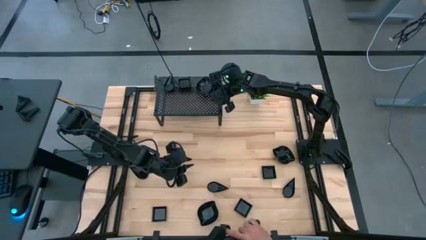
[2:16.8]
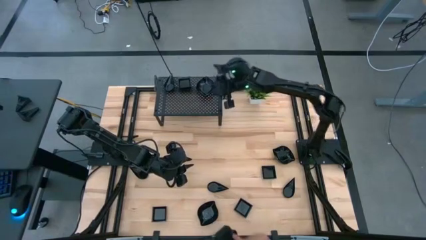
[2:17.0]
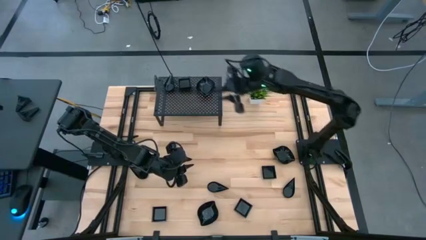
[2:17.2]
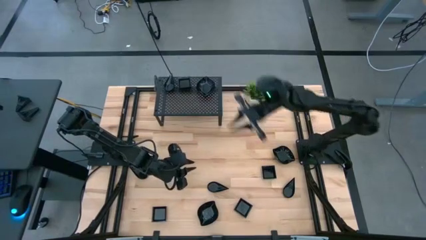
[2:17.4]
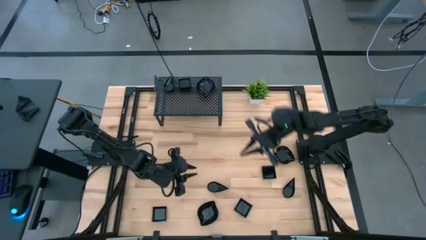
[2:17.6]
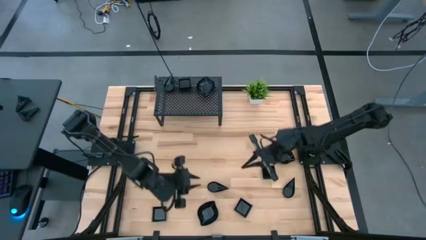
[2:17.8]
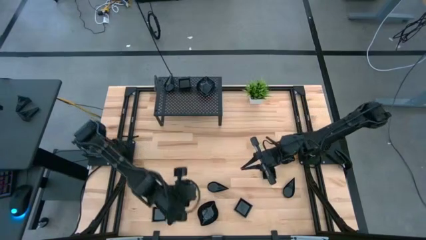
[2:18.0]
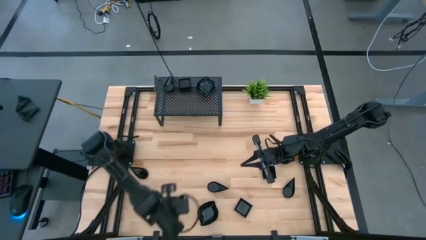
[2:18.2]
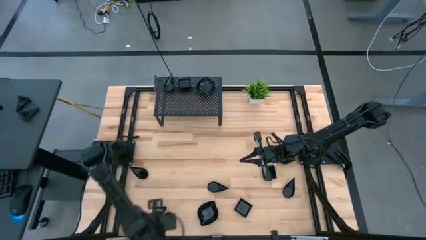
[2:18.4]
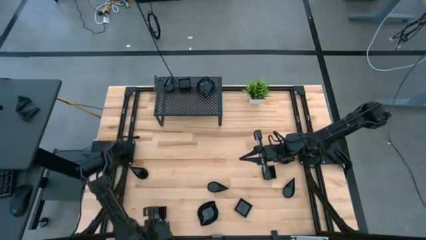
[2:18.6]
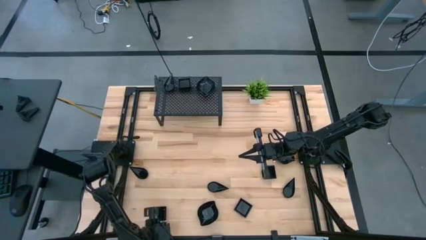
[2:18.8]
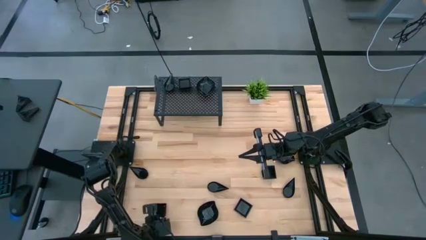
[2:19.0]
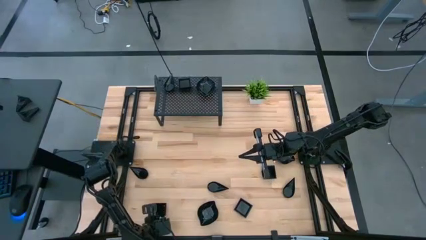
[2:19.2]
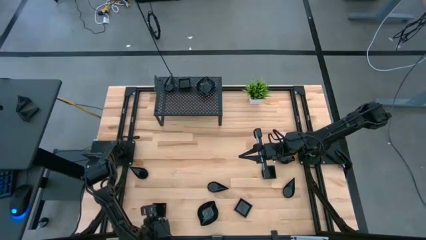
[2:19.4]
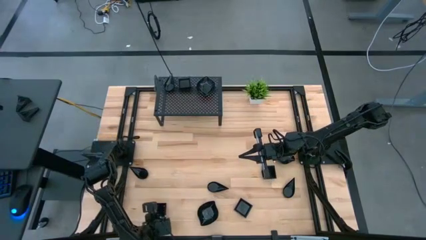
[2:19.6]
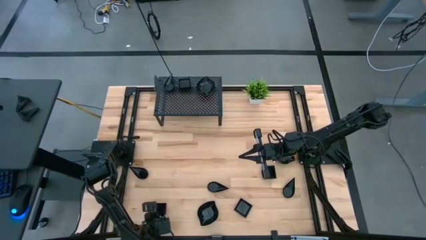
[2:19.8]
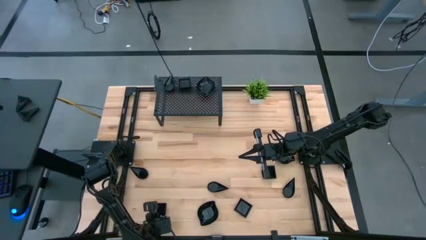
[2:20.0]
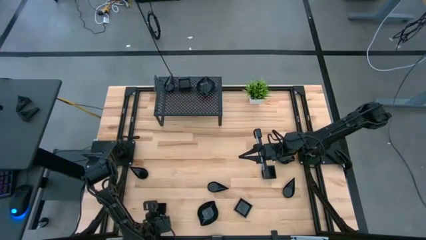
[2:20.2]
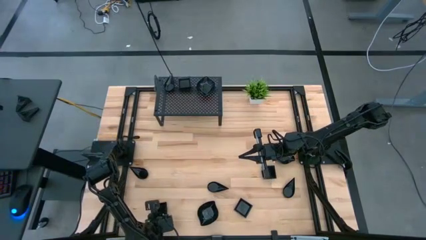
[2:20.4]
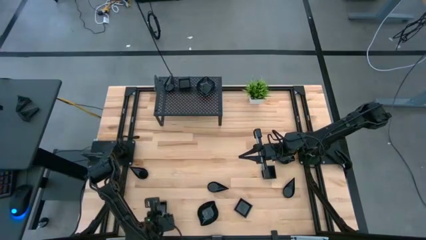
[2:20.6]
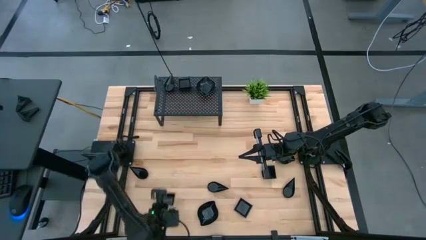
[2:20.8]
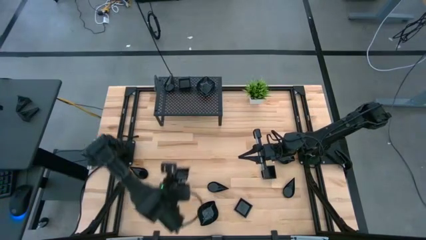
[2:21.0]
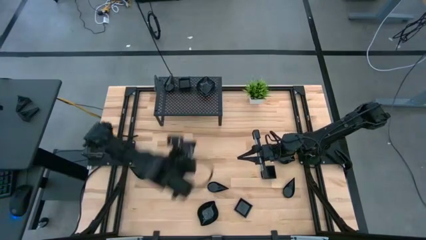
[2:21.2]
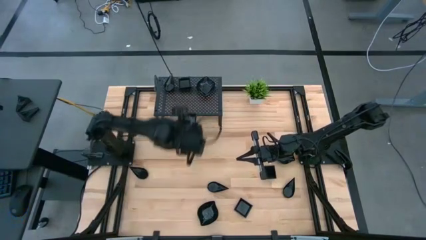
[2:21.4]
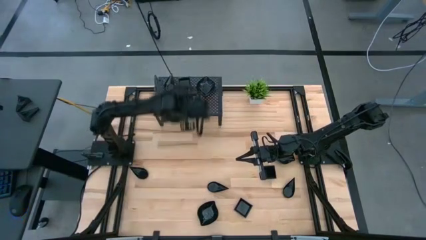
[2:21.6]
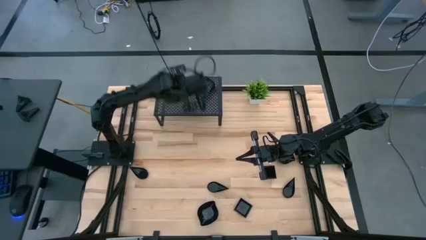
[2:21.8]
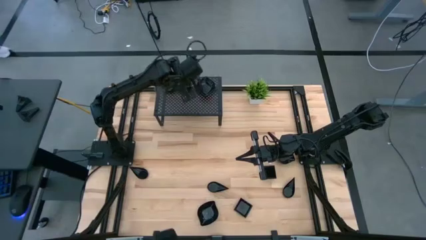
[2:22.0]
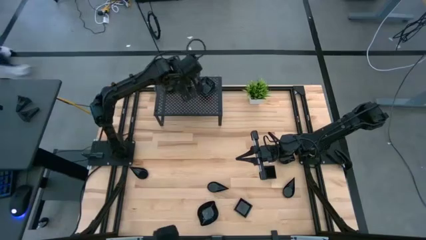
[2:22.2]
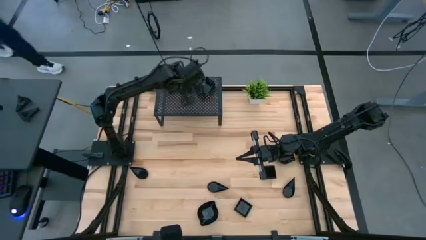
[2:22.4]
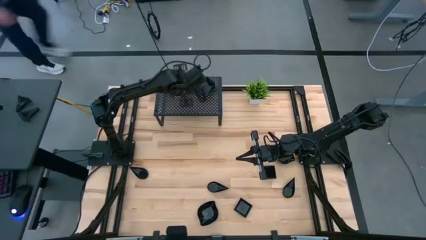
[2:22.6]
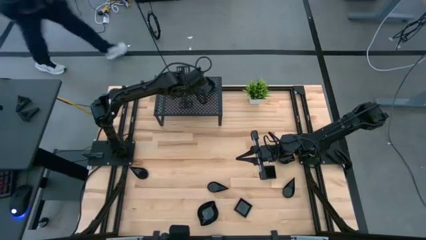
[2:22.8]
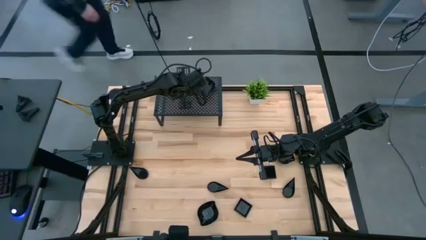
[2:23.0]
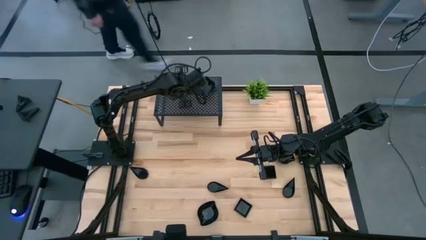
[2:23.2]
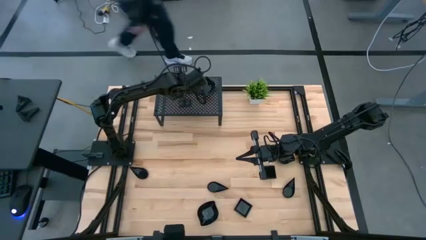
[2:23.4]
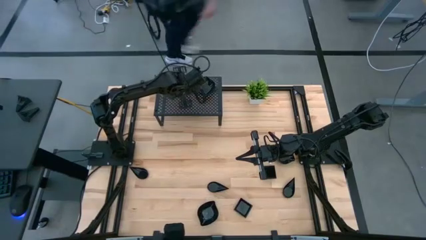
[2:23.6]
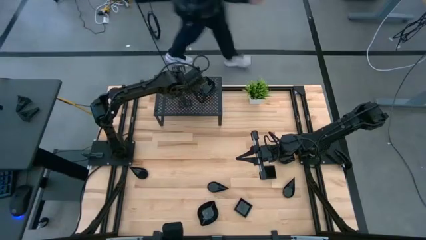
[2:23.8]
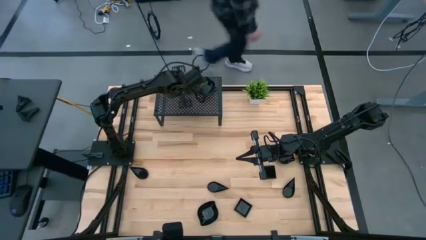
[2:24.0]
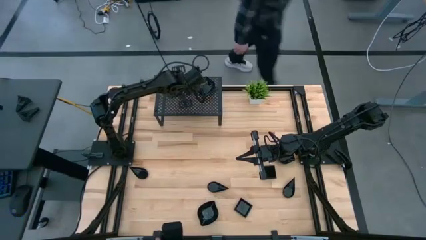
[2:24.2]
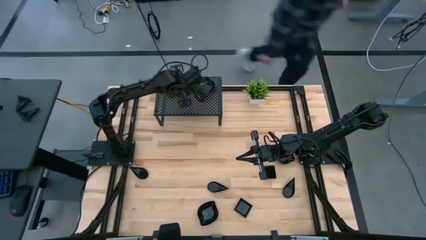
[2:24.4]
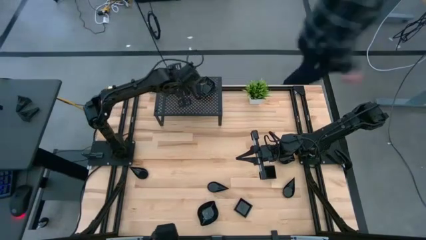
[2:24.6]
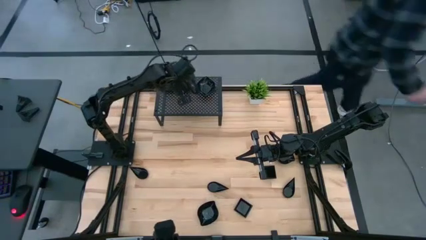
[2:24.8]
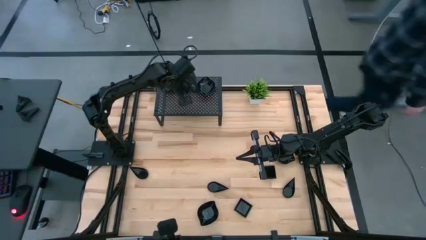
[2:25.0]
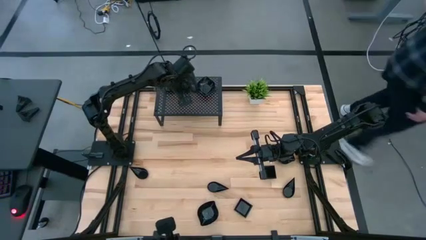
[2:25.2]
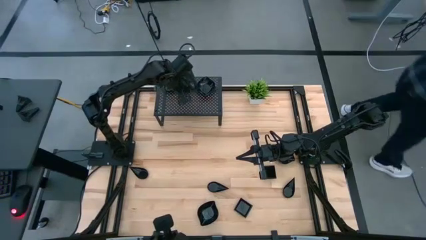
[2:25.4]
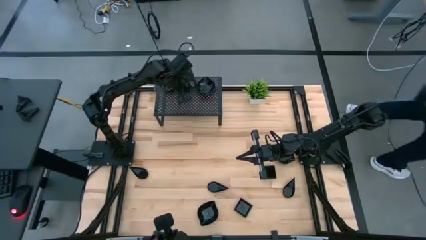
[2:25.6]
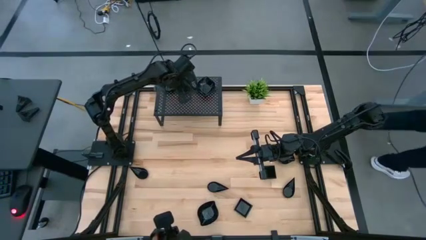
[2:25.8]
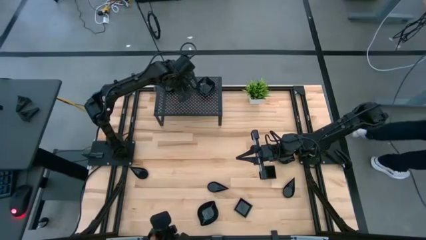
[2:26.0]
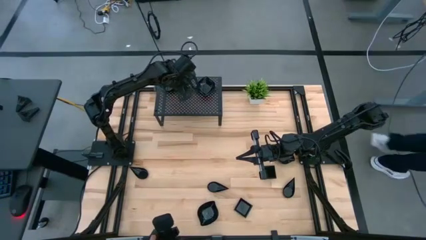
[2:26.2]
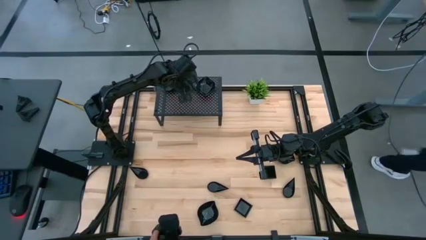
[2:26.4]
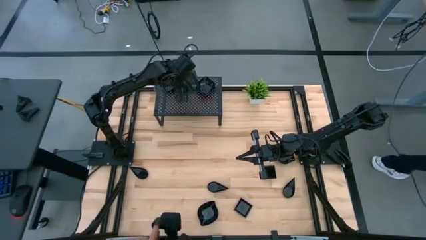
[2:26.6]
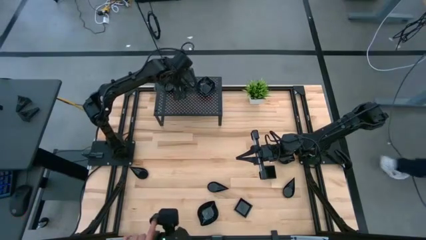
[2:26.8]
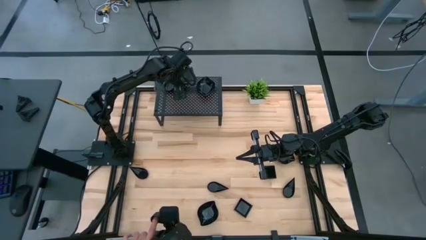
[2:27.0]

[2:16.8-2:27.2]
Task: Pick & Place Mini shaped plates
Stack the black square plate on top of the square plate on the shelf

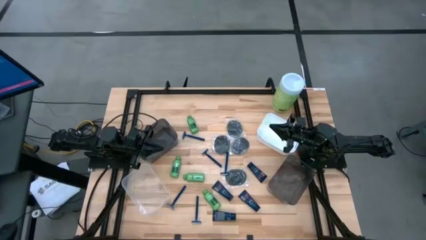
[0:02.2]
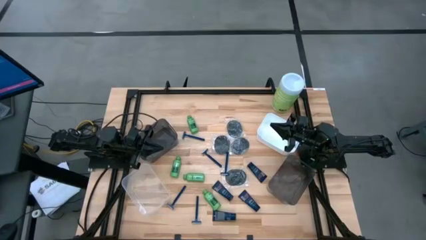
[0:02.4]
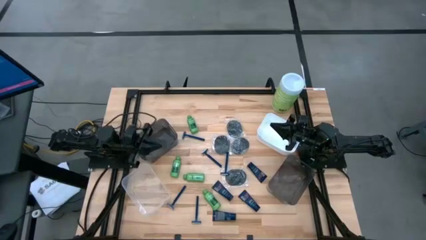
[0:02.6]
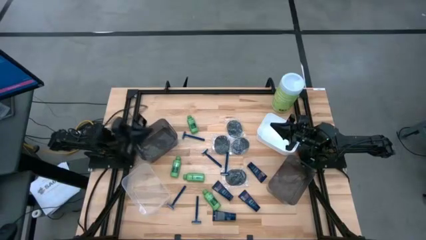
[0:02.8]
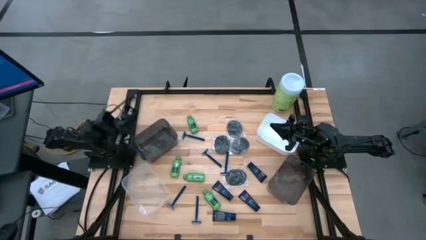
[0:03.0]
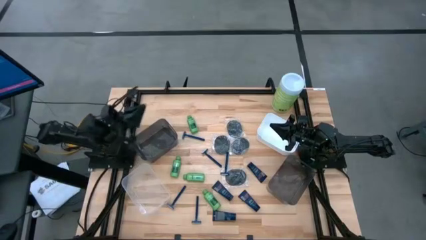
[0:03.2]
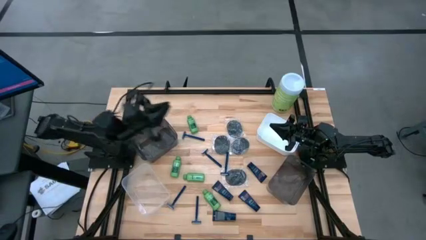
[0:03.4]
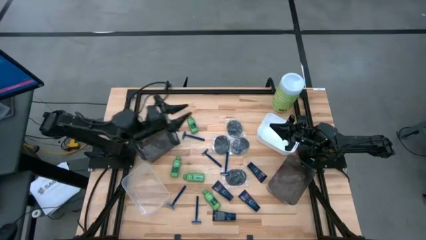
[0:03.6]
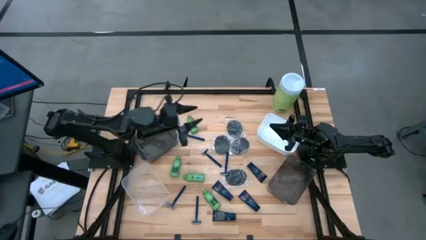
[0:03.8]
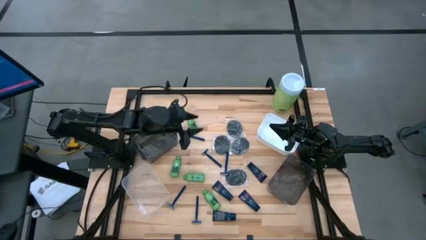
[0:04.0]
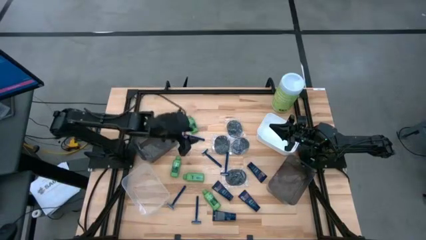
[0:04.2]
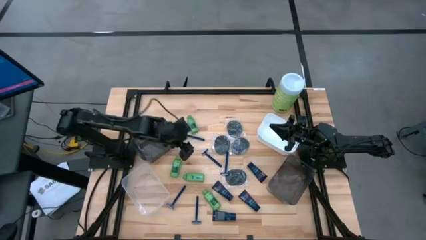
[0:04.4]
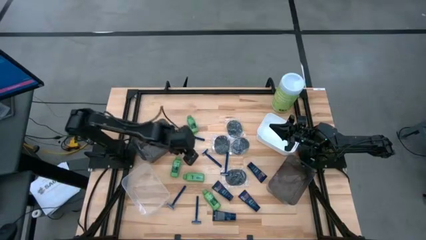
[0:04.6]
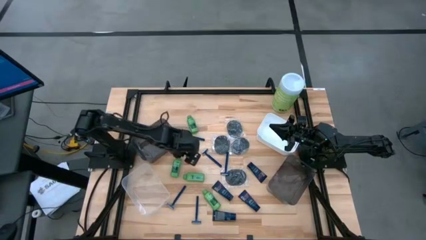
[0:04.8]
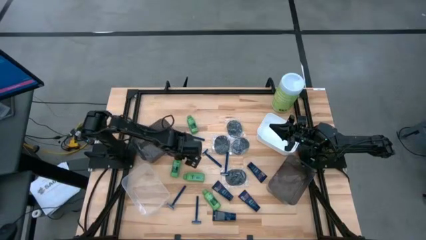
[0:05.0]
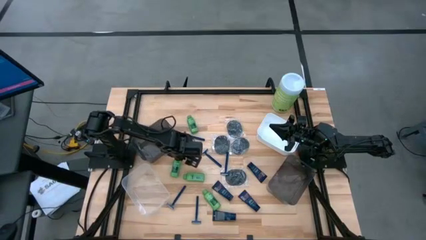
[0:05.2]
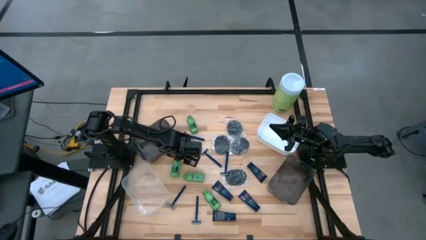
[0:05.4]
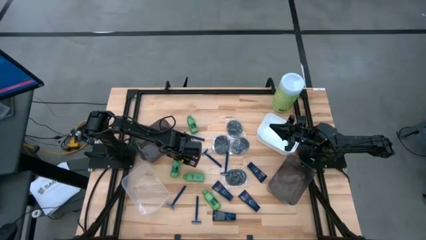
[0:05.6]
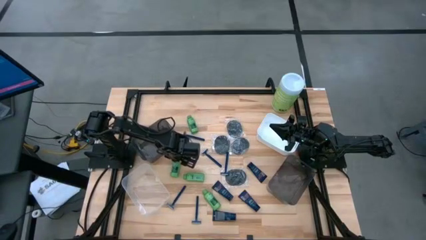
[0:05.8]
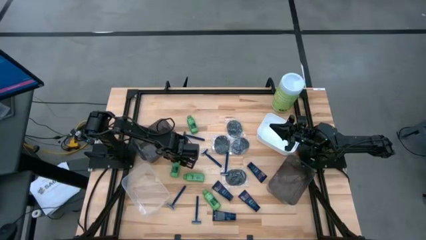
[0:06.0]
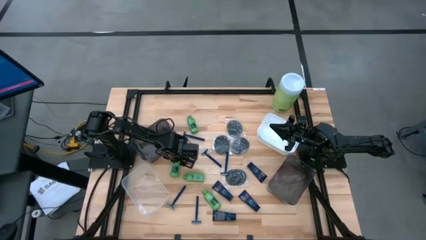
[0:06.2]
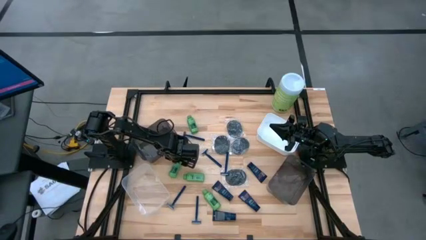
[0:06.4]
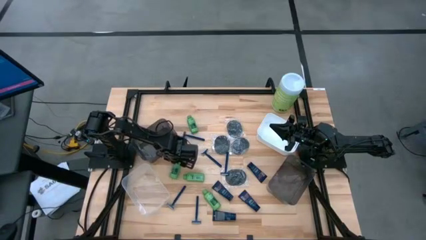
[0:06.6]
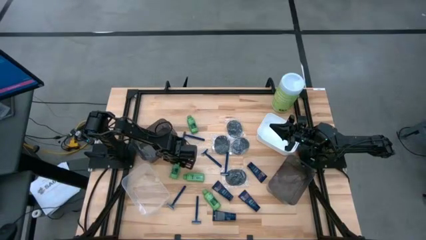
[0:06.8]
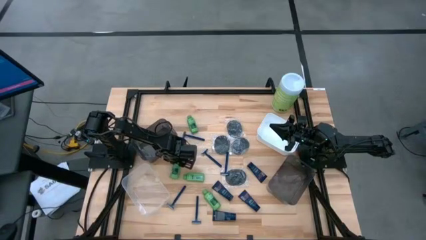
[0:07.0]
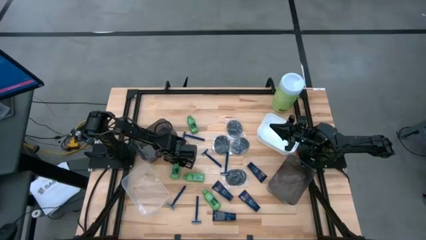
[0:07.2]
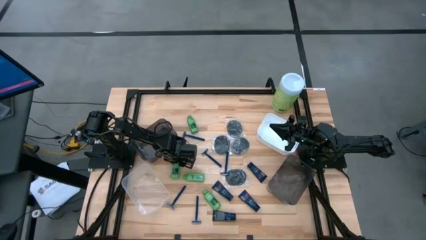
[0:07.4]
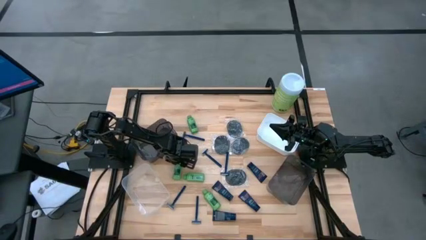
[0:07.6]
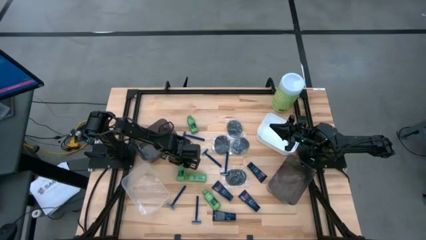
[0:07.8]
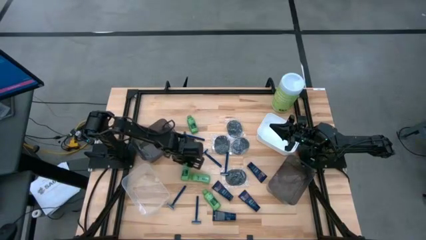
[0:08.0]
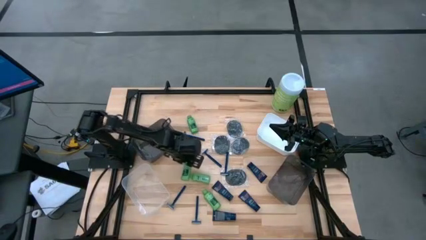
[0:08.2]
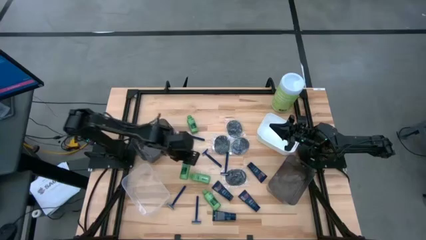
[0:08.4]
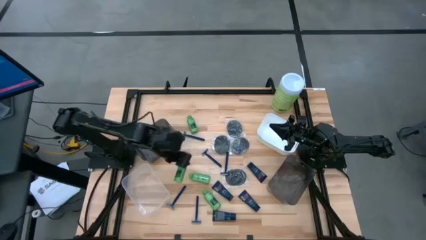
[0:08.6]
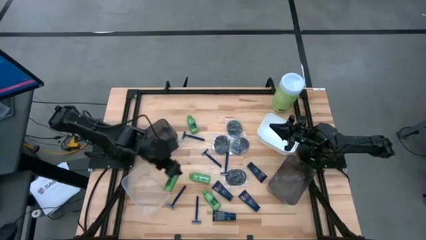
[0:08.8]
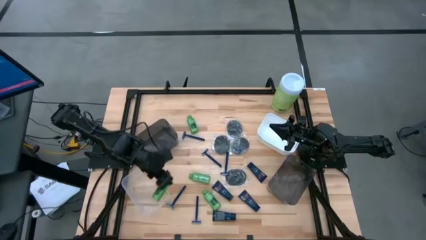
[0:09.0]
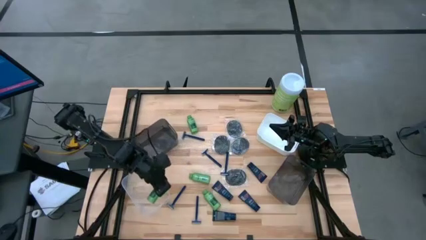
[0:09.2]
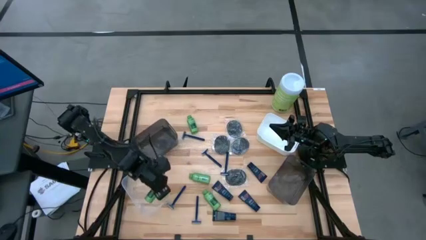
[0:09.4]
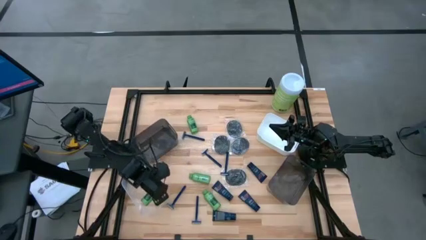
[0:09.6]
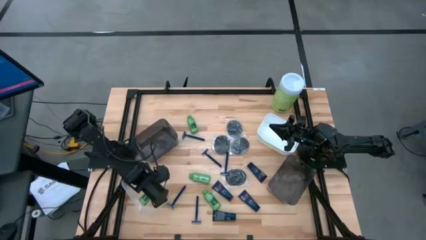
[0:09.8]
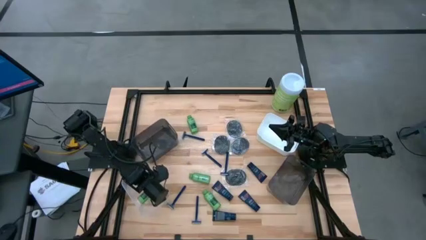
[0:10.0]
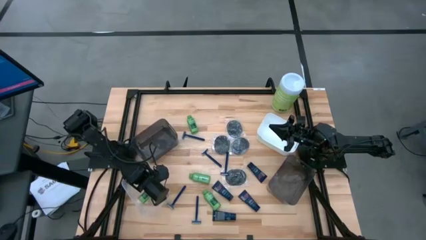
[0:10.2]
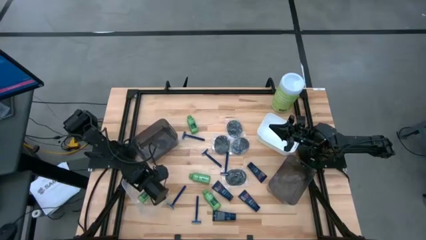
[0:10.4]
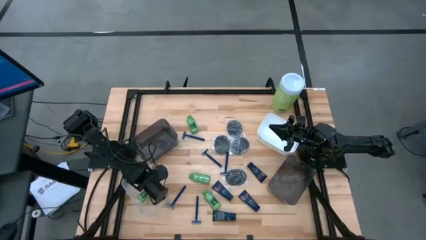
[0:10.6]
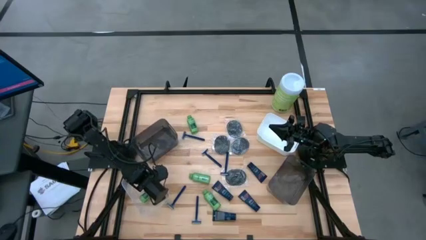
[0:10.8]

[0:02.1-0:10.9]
Task: Pick & Place Travel size toiletries
Put the green shampoo into the transparent bin
